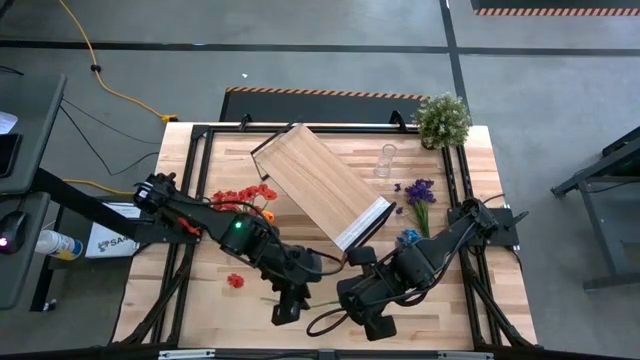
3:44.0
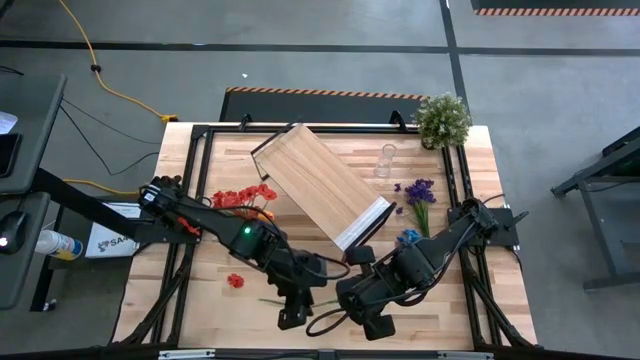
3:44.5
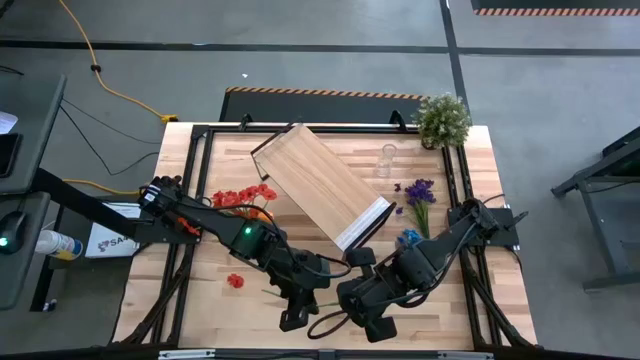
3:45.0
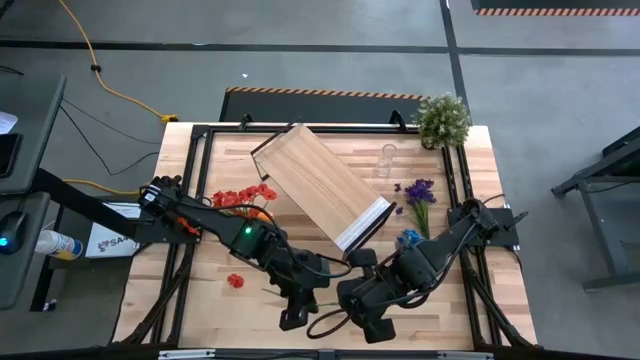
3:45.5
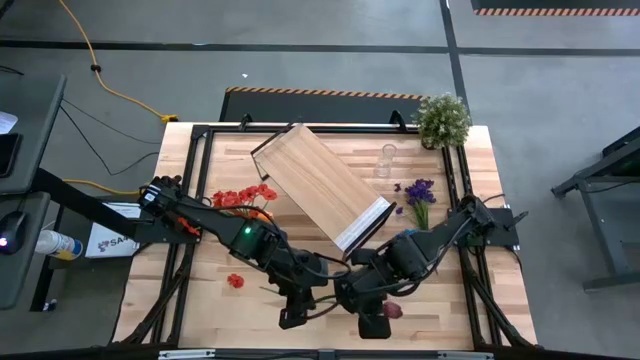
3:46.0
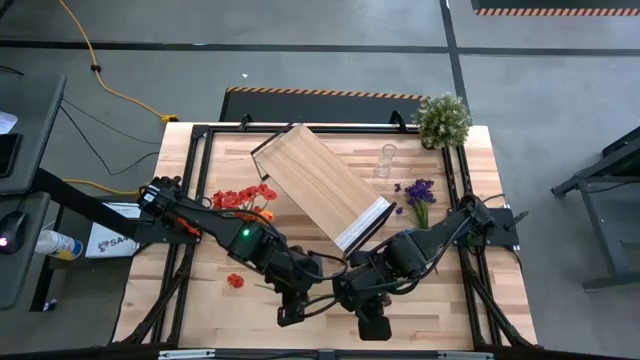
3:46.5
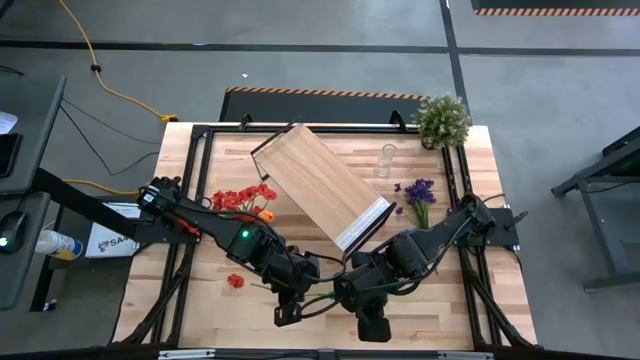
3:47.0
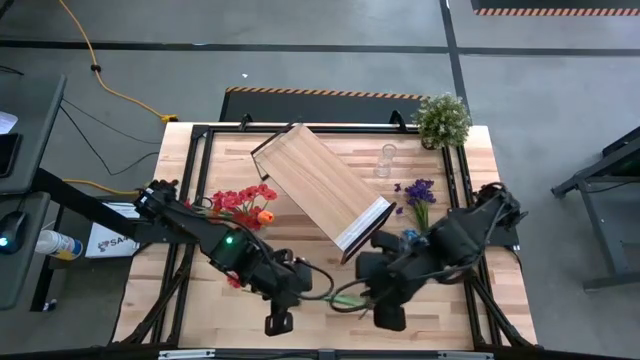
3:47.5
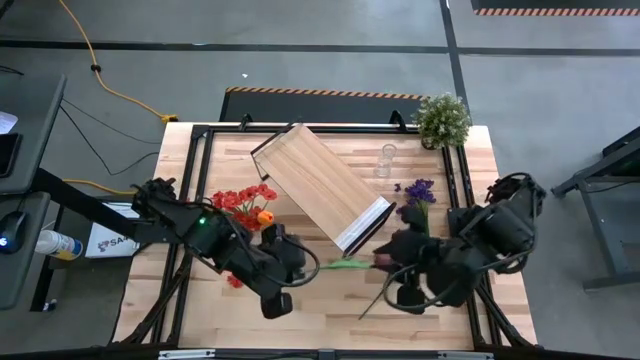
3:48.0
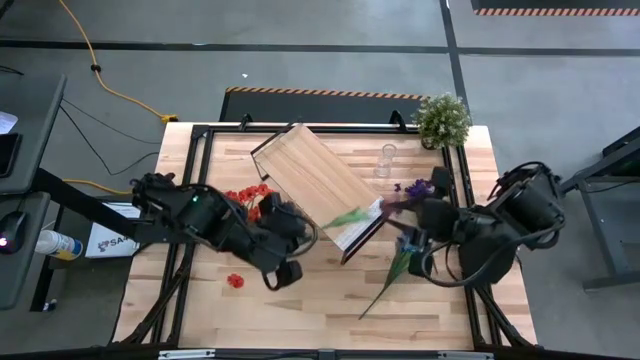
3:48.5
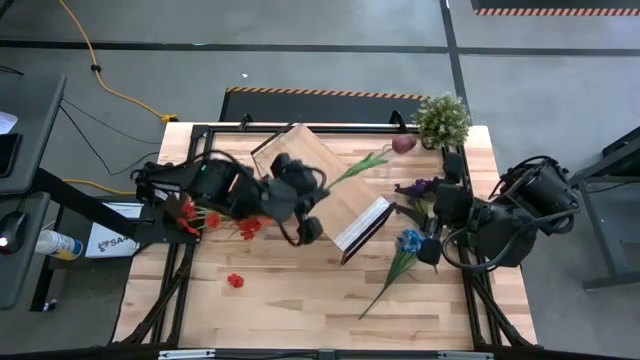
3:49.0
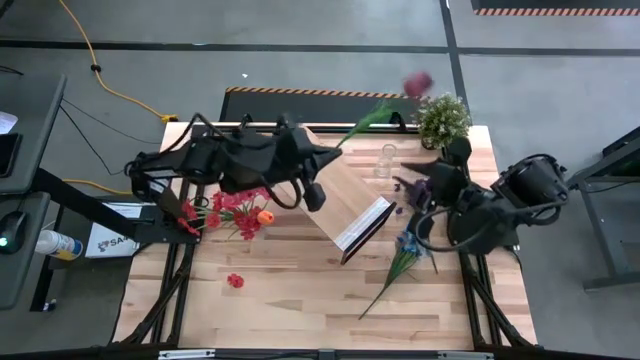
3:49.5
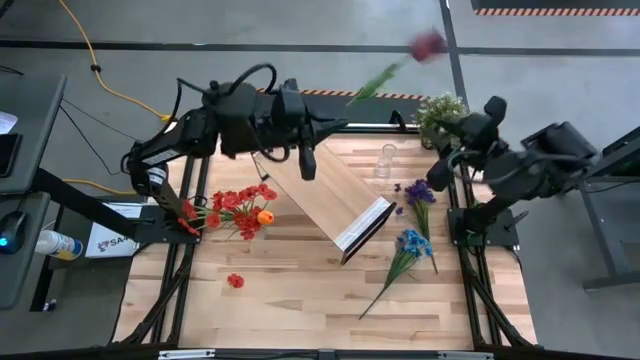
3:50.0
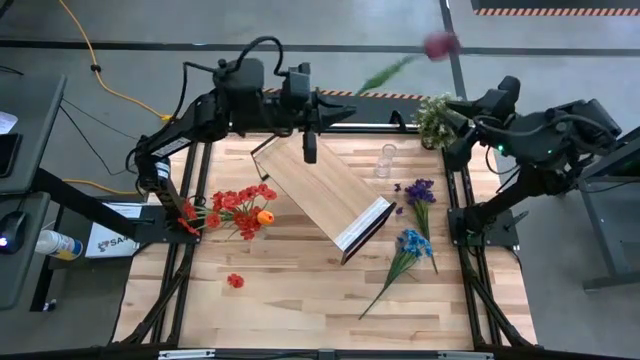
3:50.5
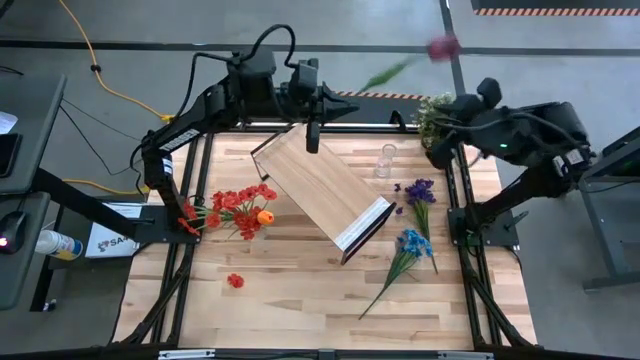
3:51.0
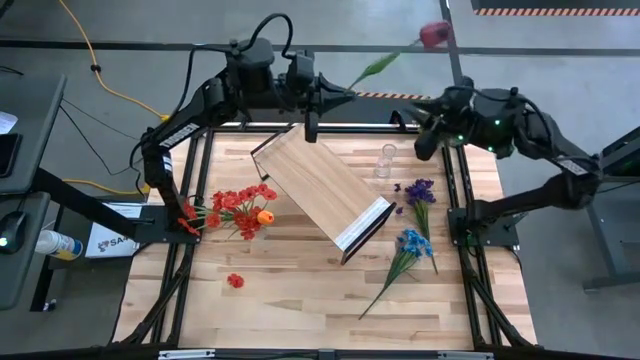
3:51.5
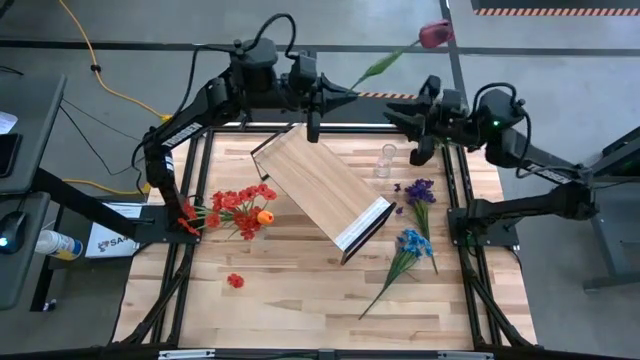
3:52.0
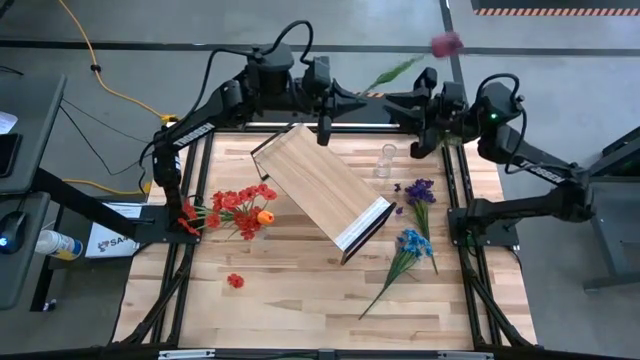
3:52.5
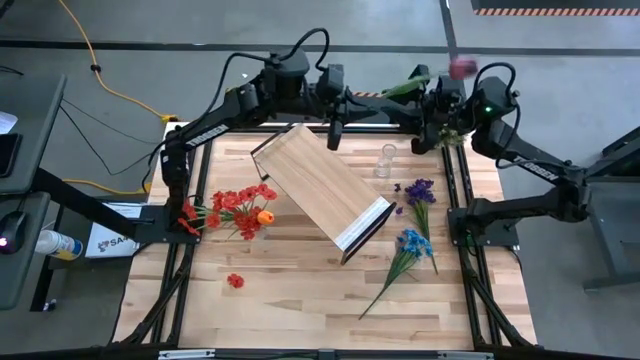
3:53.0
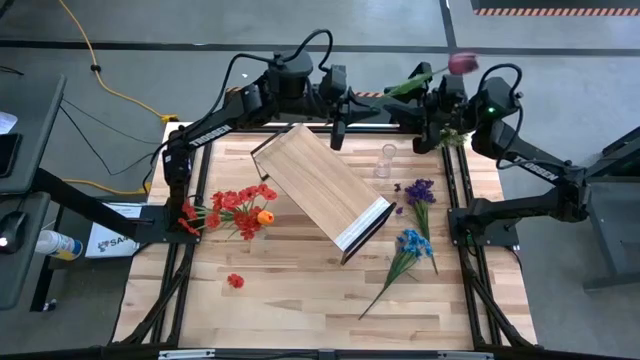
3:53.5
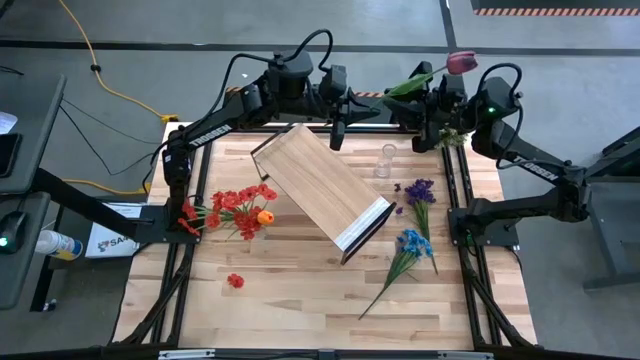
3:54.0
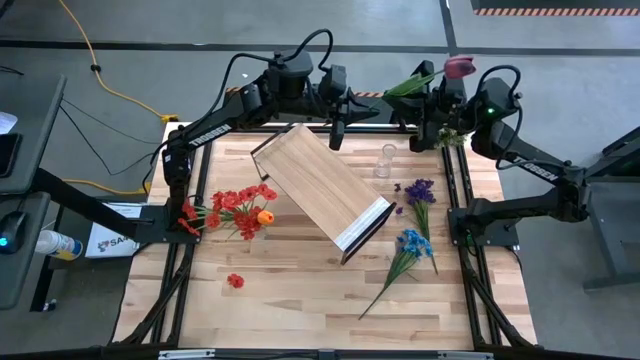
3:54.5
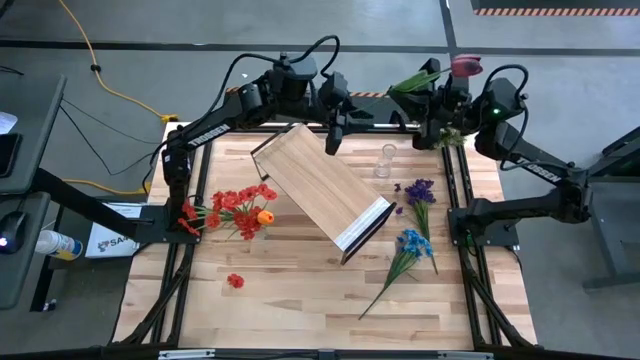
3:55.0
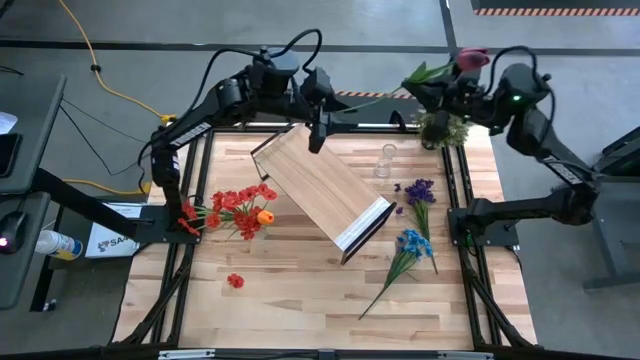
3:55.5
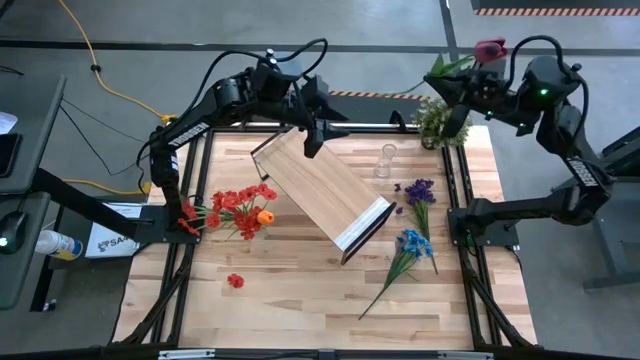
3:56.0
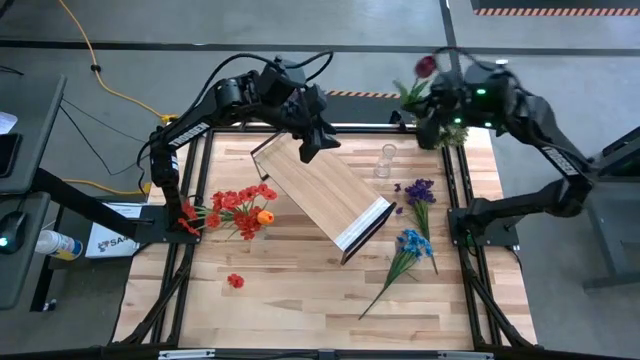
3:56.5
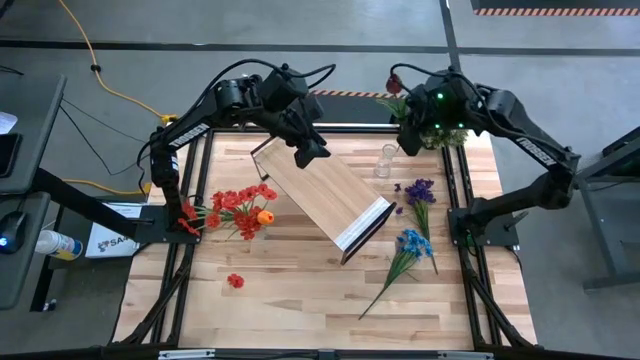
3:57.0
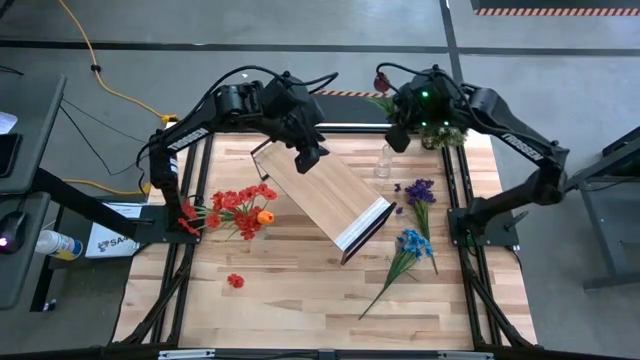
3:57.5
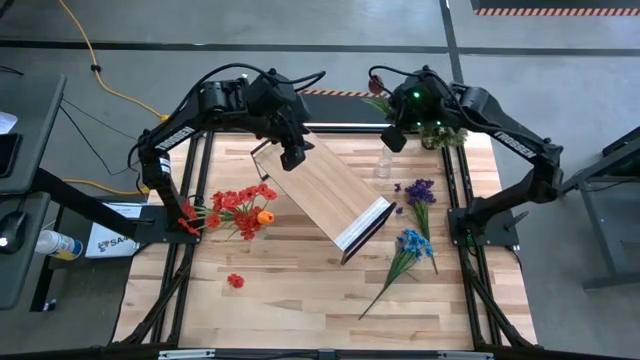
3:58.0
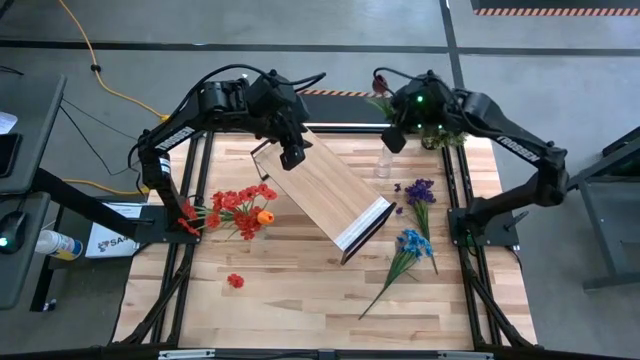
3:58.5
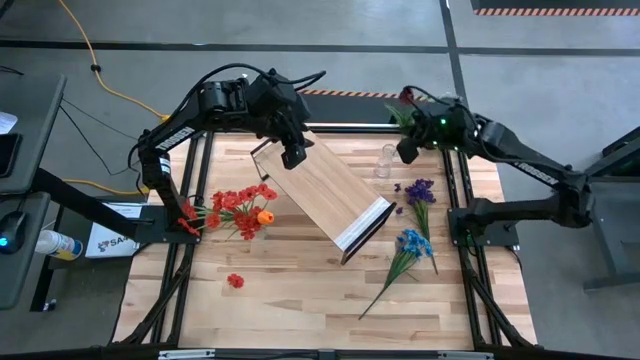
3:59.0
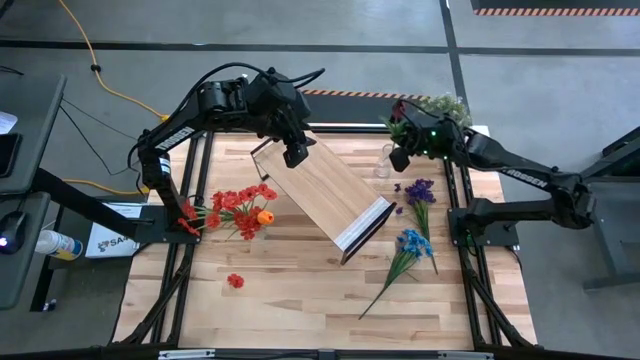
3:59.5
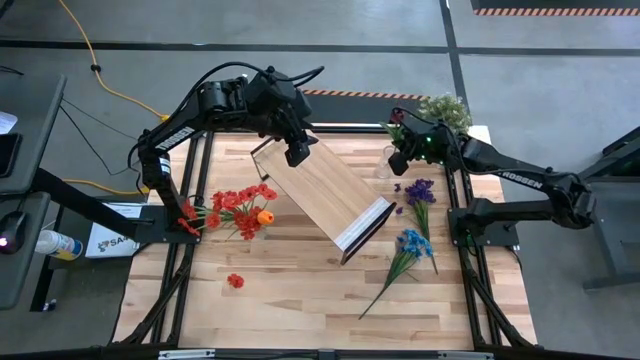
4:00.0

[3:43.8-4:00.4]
Task: Pick and place flowers into a vace then onto a shelf
Put the red flower into the top transparent vase

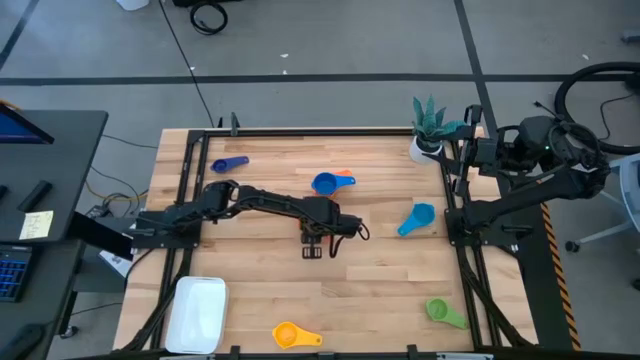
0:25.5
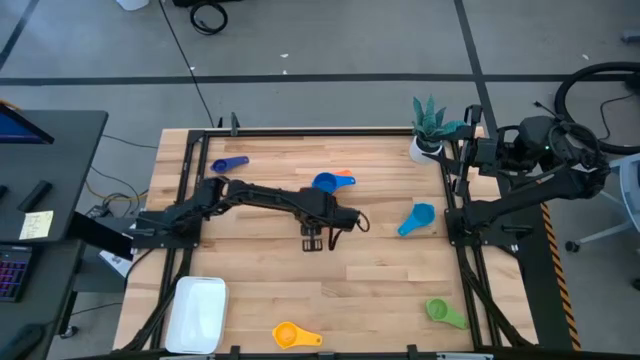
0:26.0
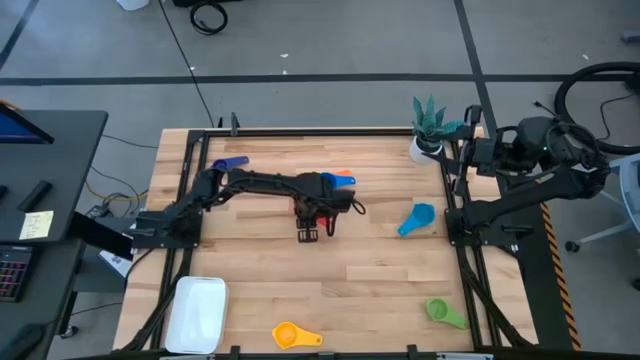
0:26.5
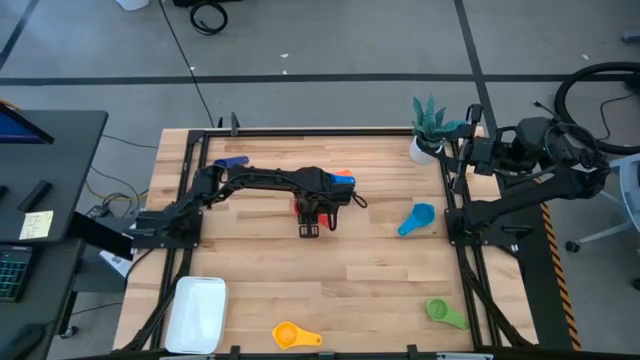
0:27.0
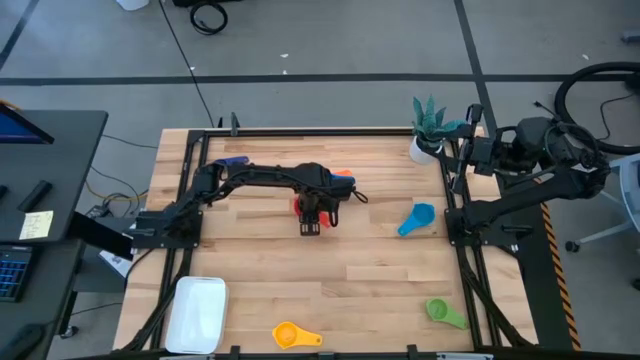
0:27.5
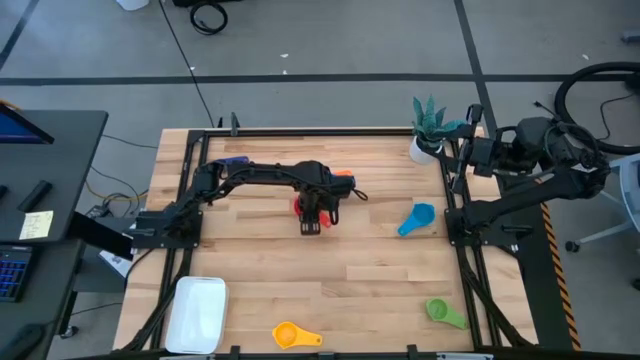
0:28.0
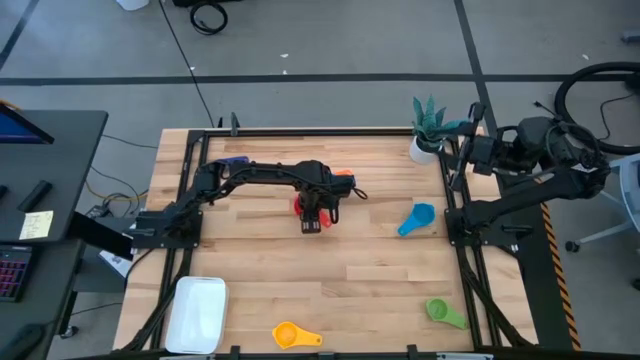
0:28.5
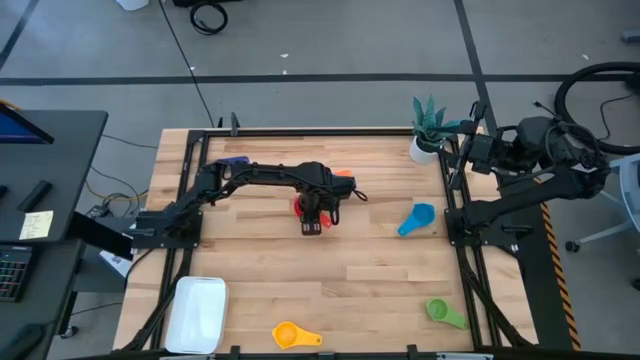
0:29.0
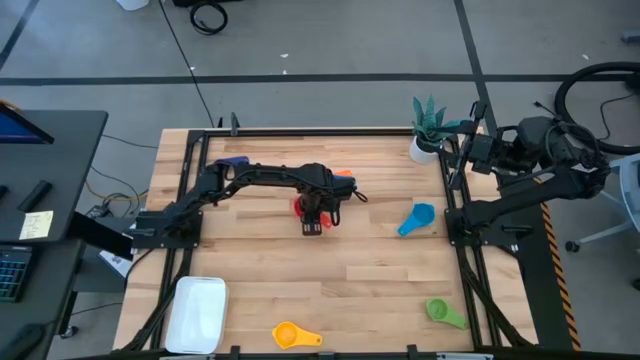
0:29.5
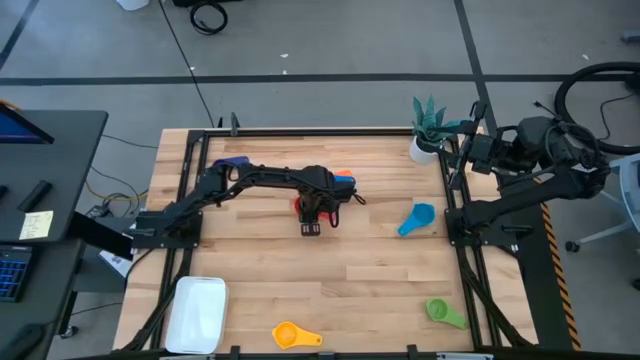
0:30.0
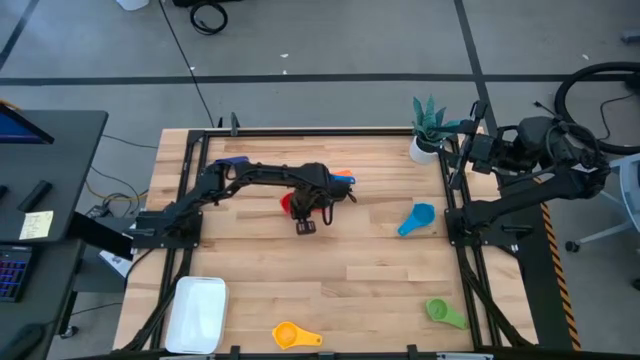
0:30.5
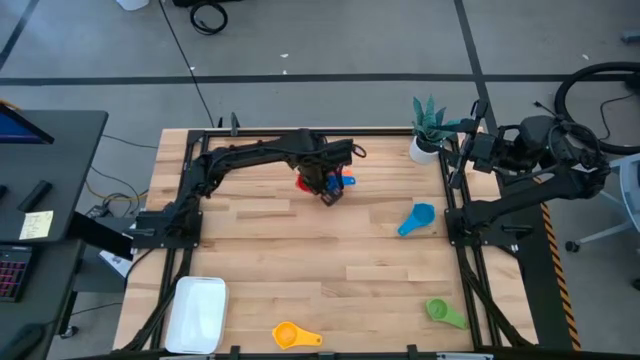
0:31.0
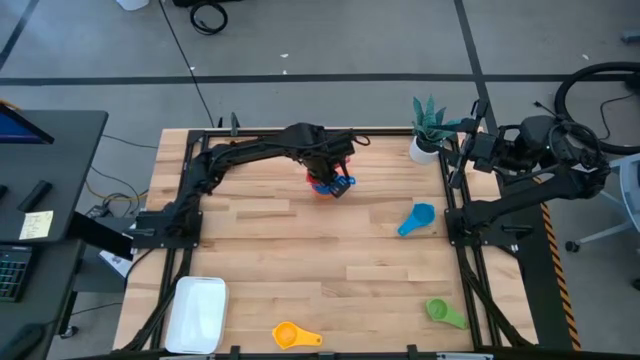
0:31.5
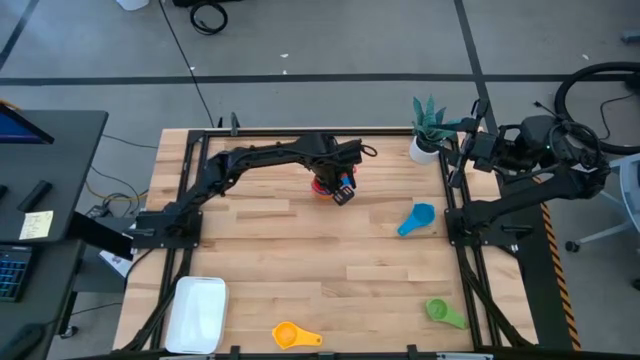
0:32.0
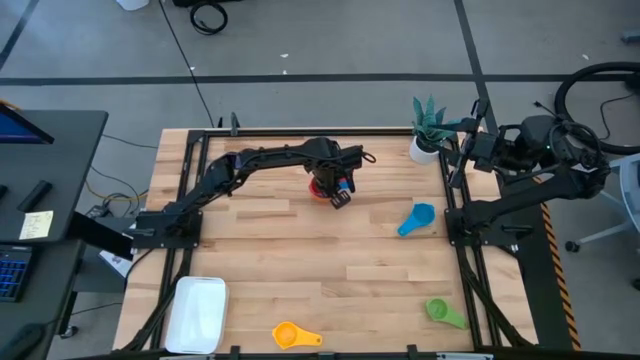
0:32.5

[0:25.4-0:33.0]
Task: Nest measuring cups in basket
Stack the red measuring cup on top of the dark blue measuring cup
